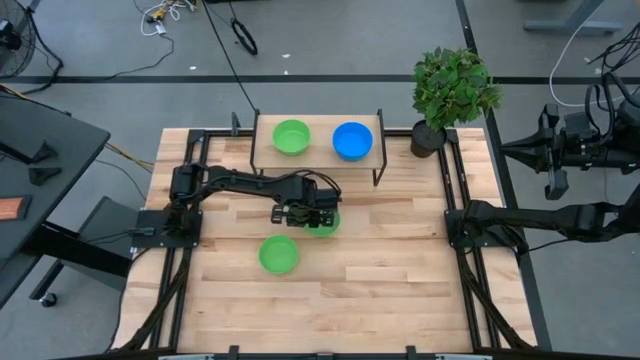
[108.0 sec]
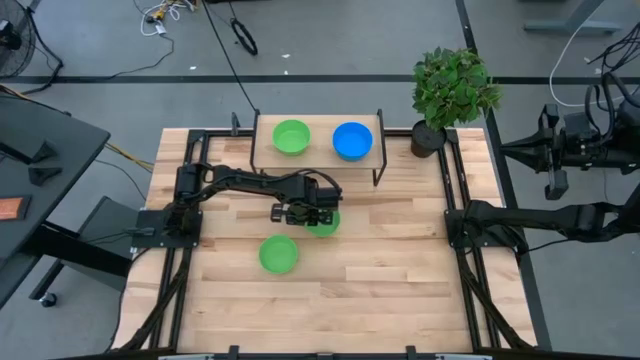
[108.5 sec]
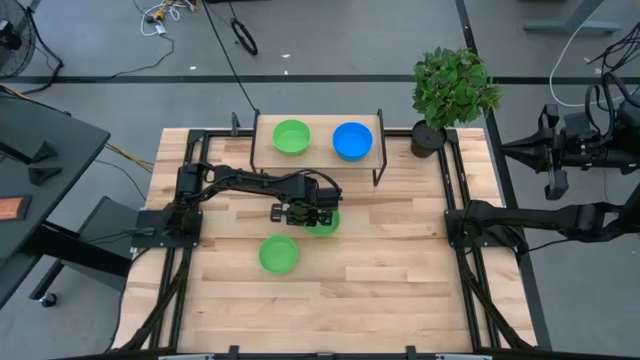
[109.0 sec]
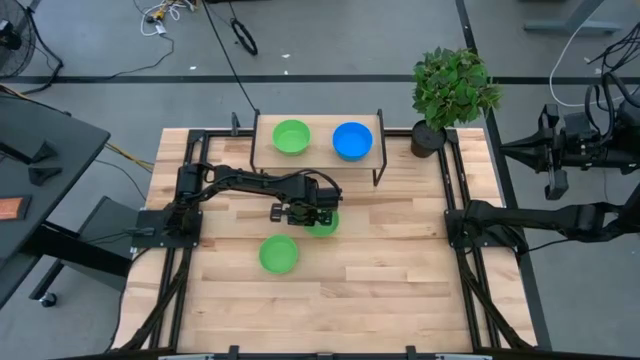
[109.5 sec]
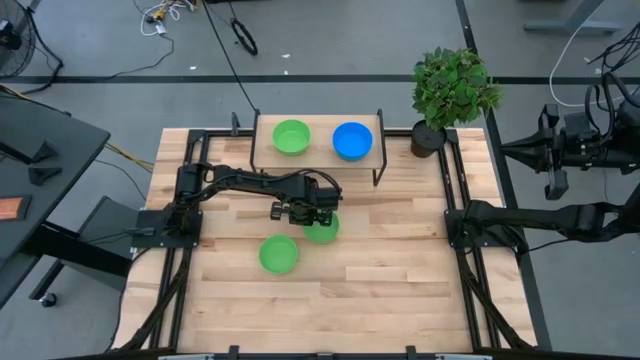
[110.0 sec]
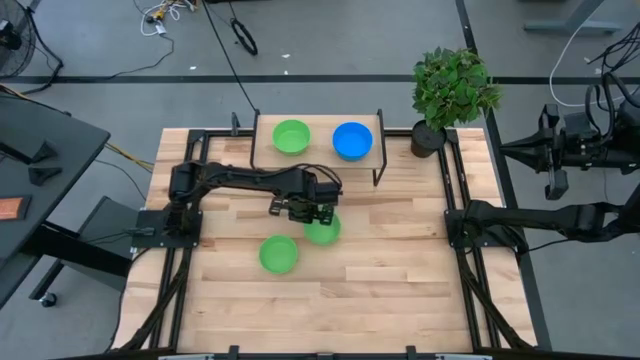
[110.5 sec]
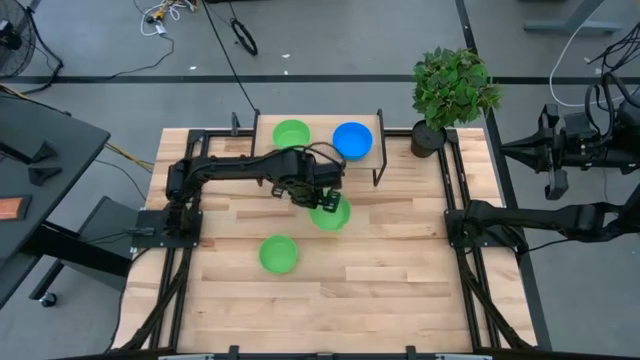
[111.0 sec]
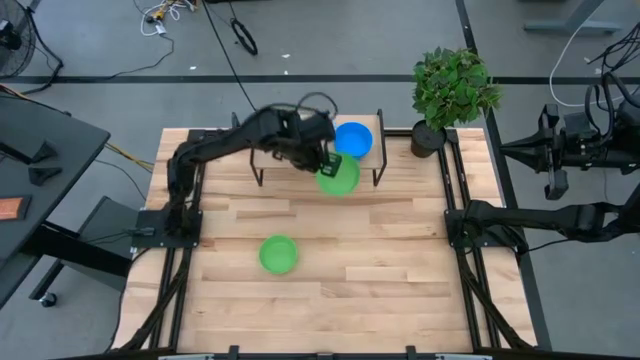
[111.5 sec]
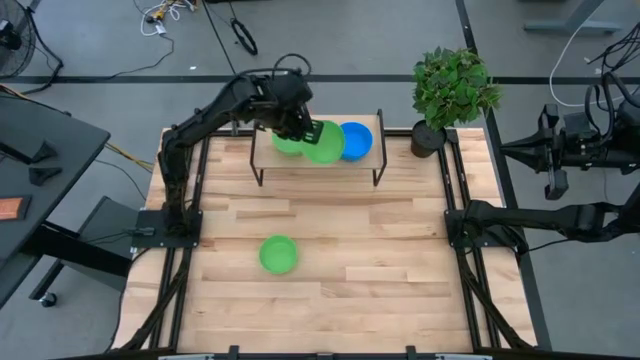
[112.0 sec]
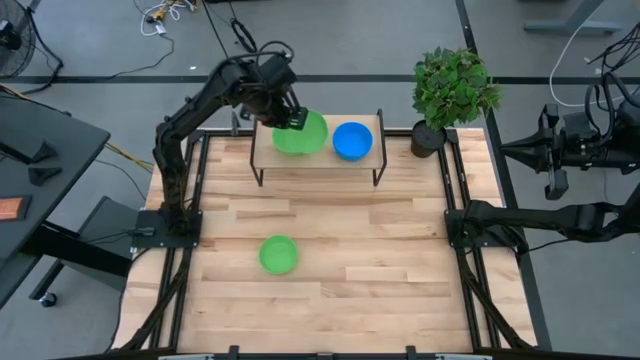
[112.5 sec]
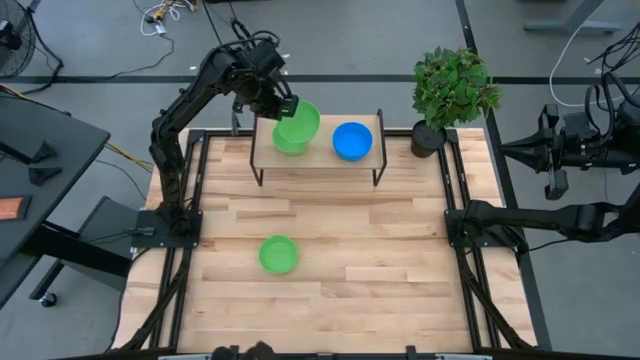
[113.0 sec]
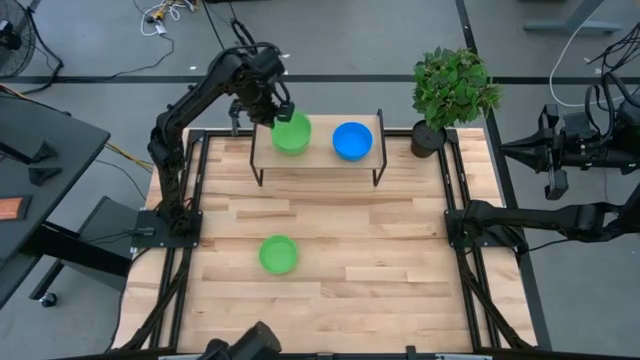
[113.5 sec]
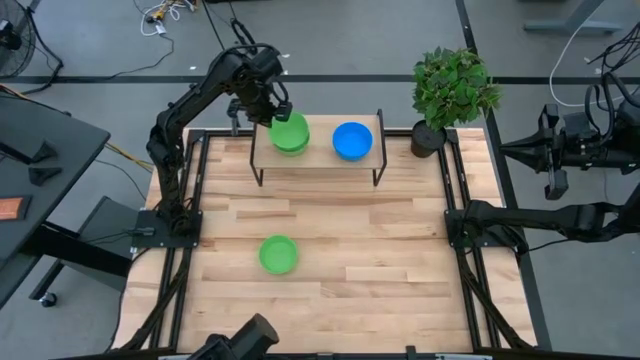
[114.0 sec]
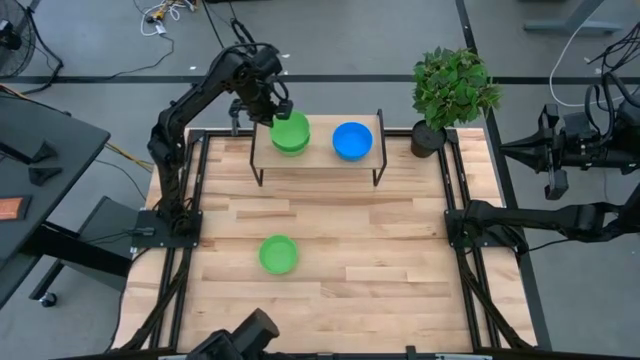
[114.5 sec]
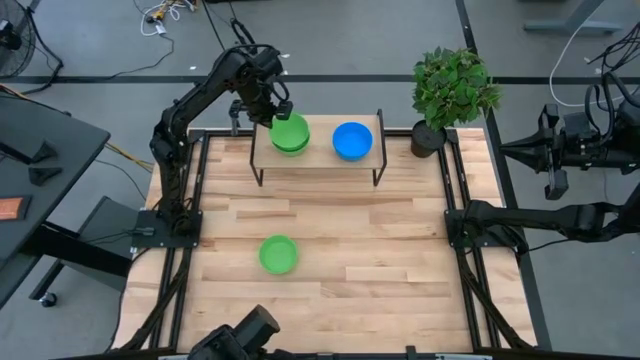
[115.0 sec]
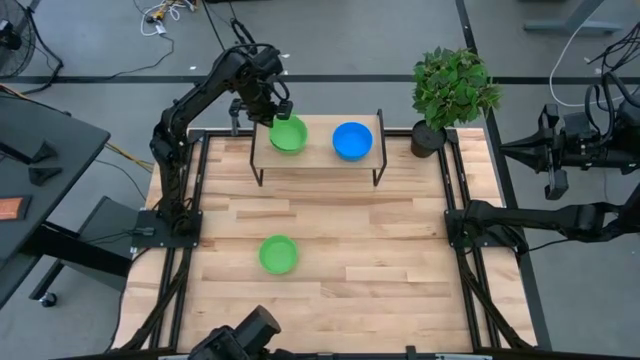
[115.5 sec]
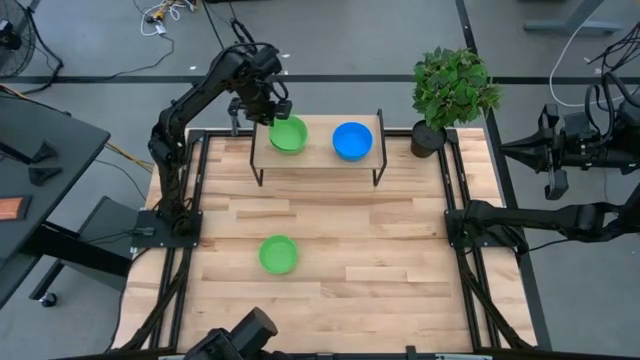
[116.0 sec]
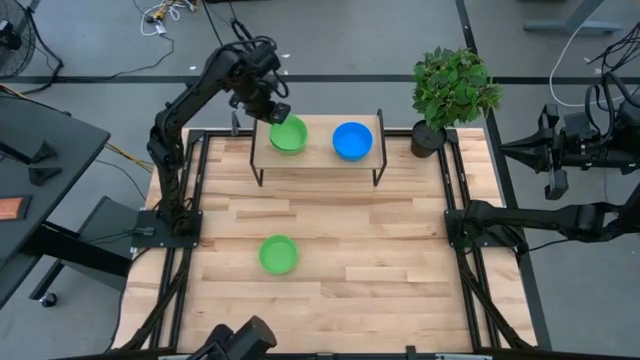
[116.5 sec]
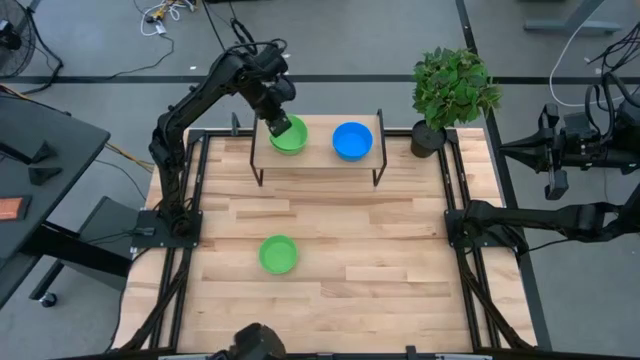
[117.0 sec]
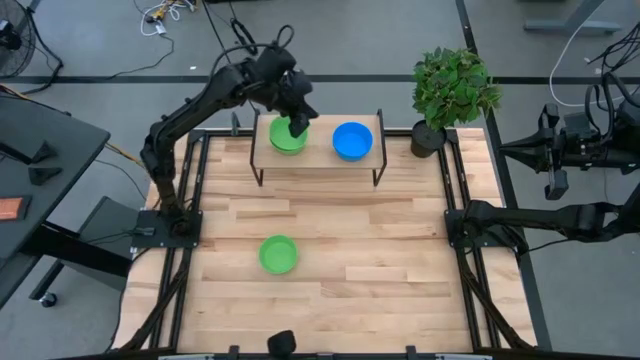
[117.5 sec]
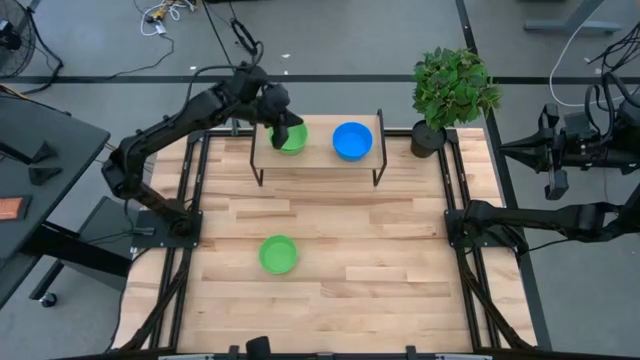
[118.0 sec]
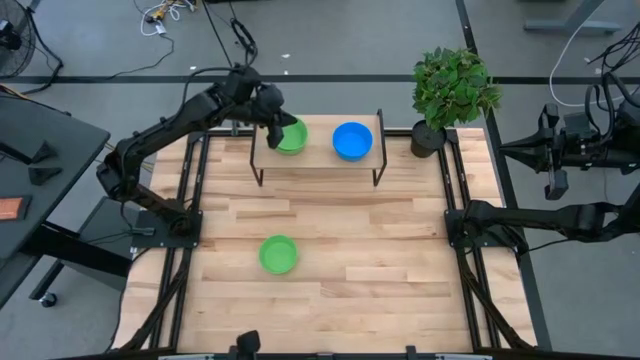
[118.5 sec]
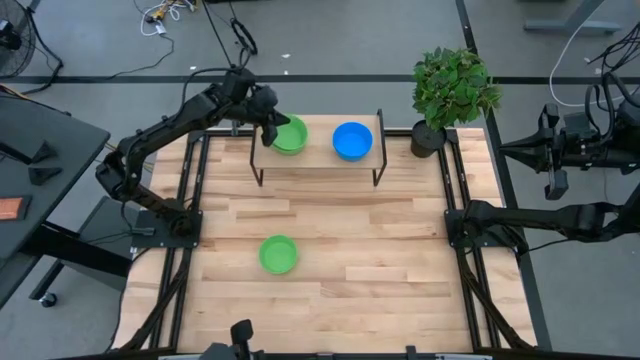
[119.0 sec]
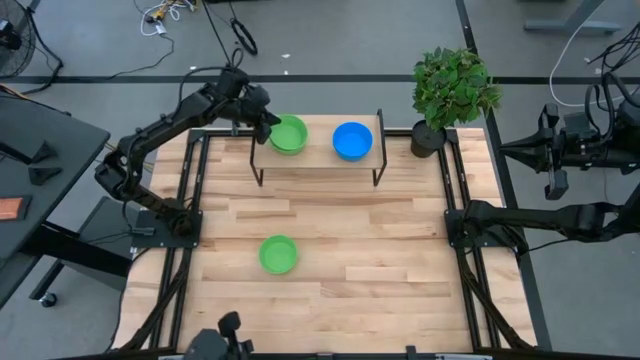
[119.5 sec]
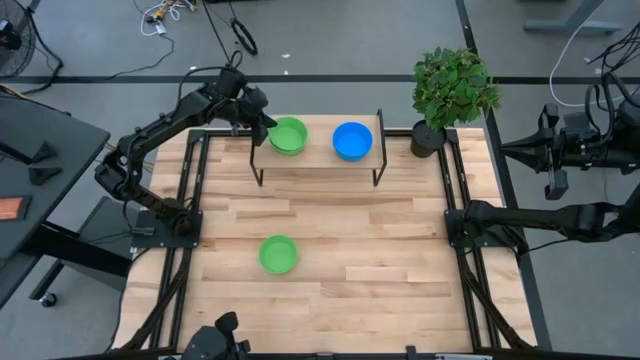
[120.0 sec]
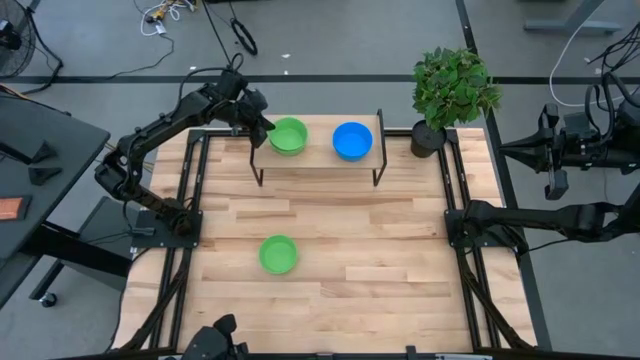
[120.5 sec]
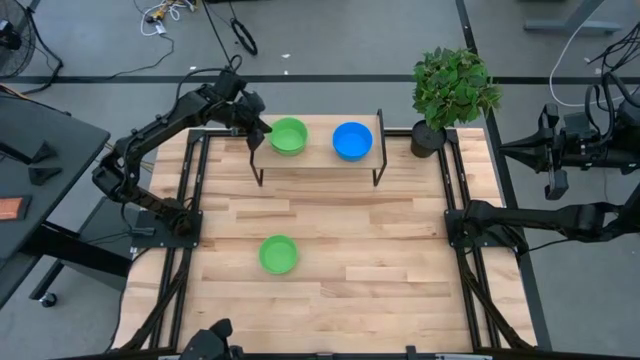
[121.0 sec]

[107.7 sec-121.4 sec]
Task: Pick & Place Mini bowls
Stack the top green bowl on the green bowl on the shelf

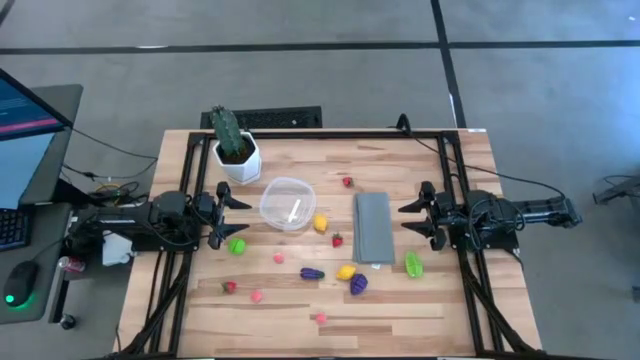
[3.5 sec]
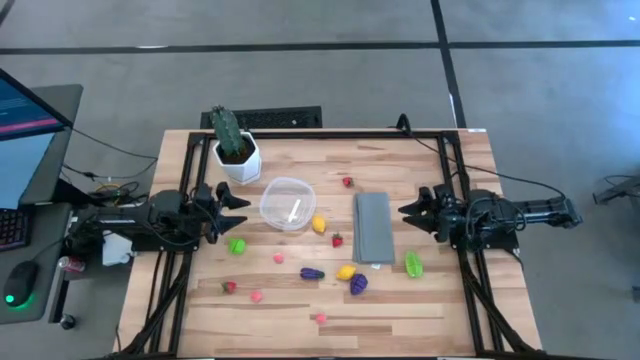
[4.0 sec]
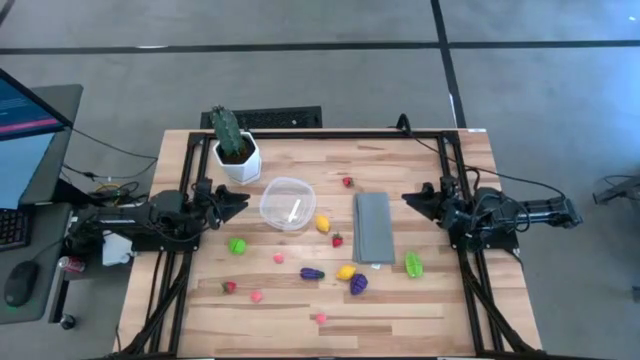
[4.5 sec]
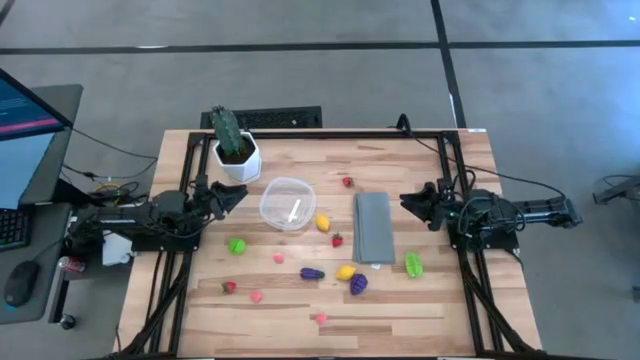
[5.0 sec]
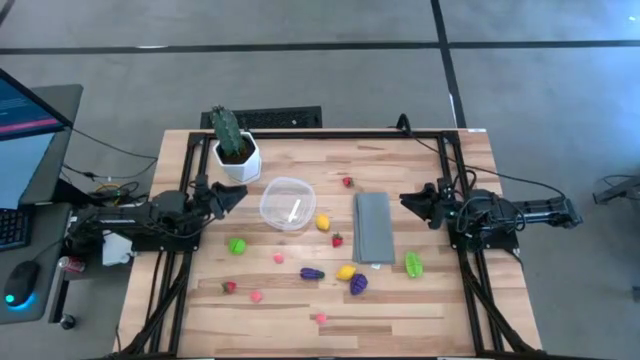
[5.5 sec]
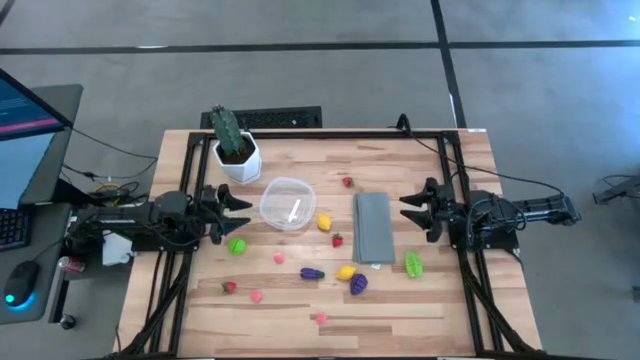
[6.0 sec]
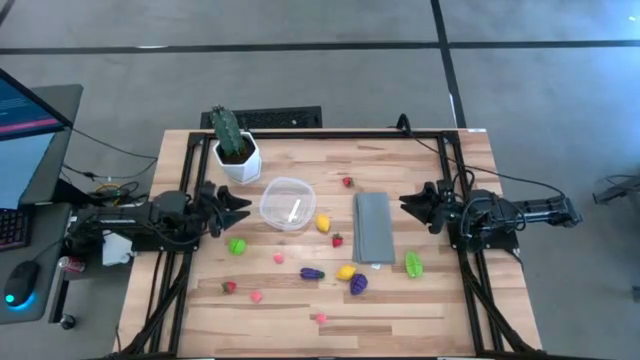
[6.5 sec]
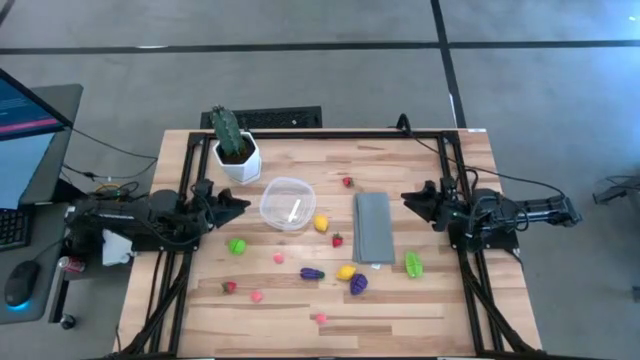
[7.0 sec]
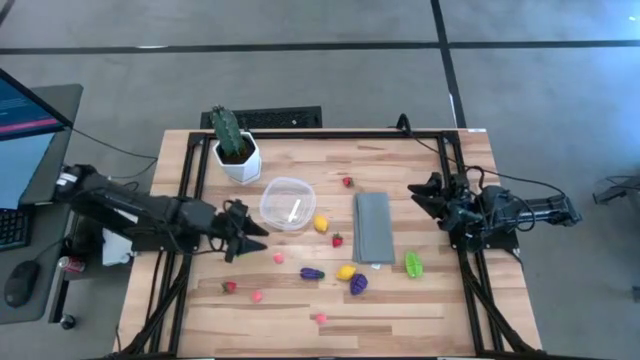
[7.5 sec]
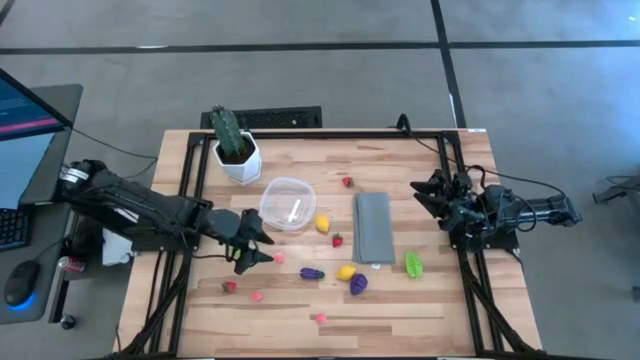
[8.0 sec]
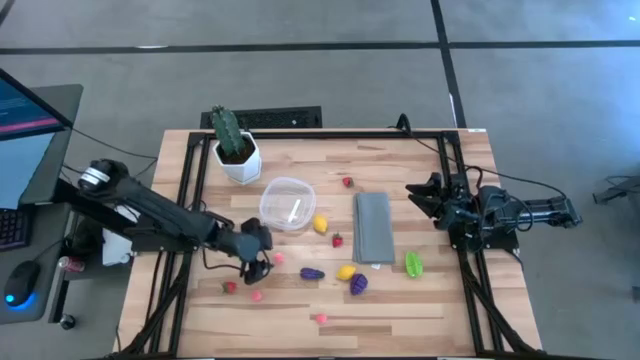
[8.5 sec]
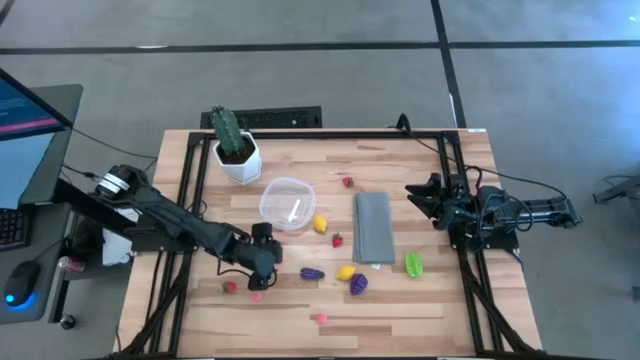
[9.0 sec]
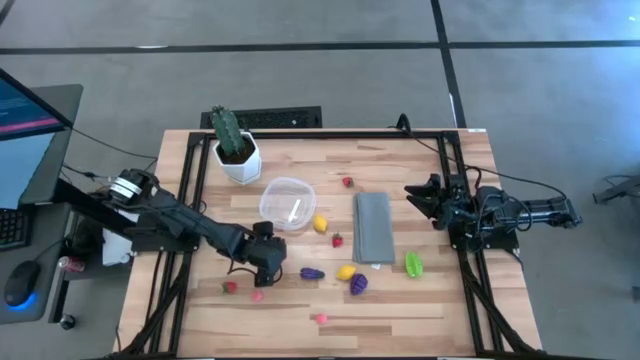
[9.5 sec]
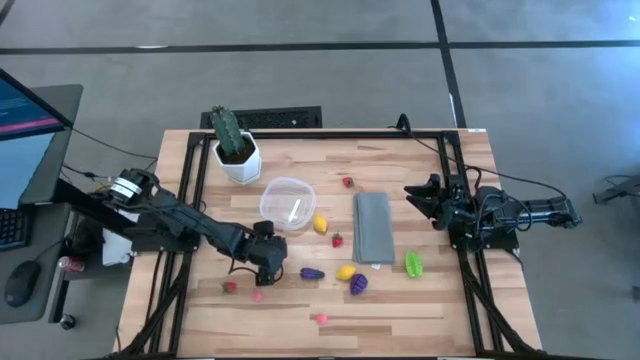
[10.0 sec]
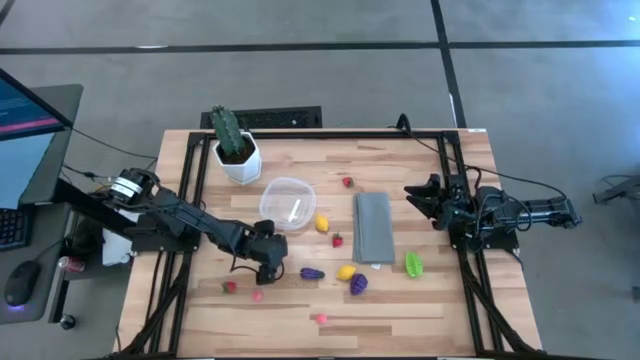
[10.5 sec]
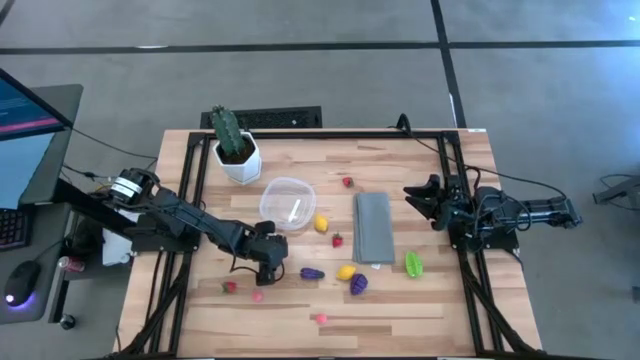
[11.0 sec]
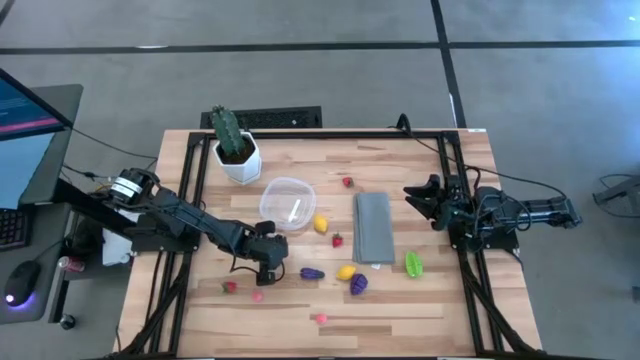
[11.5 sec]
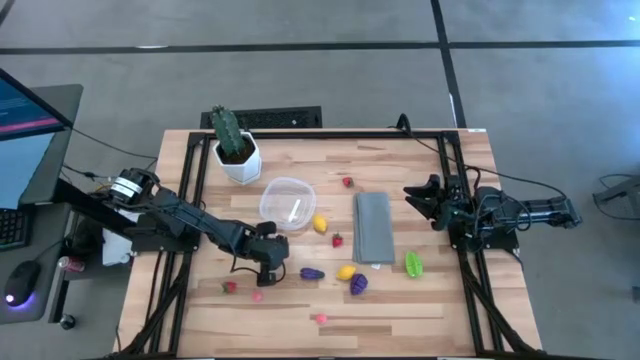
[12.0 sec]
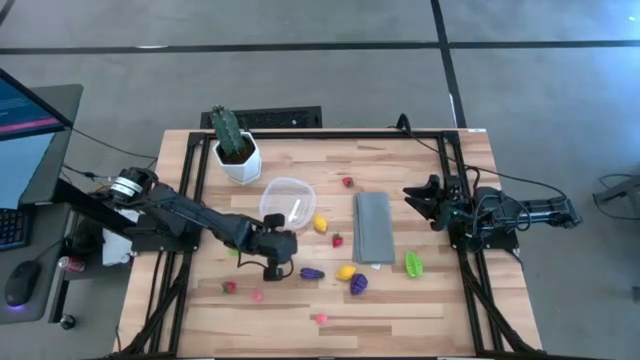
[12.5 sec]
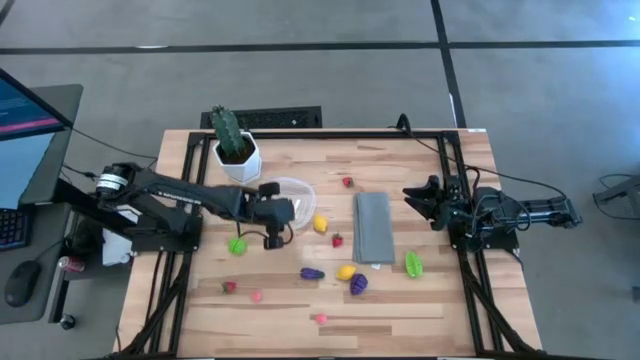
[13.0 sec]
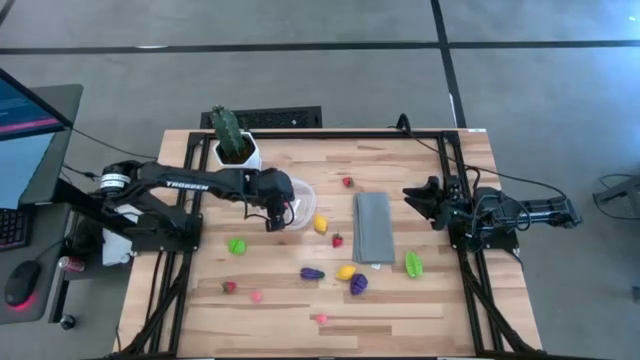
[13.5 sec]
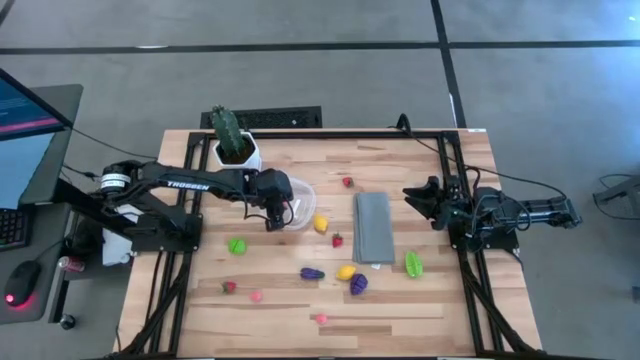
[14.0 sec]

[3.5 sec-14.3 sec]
Task: Pick and placing Produce into tupperware
Put the top pink peach into the transparent container
